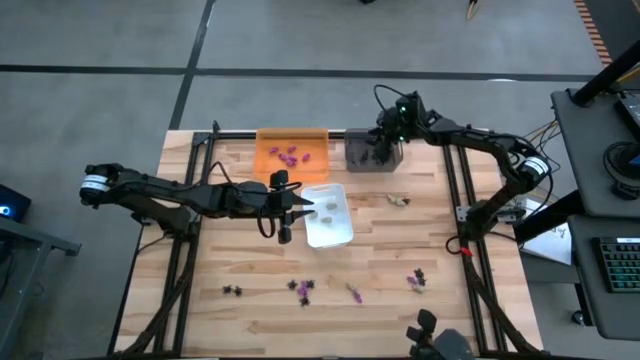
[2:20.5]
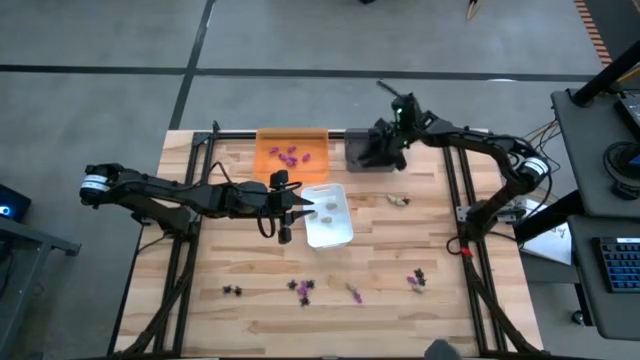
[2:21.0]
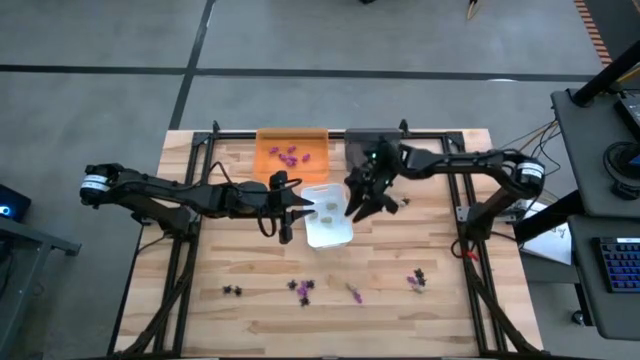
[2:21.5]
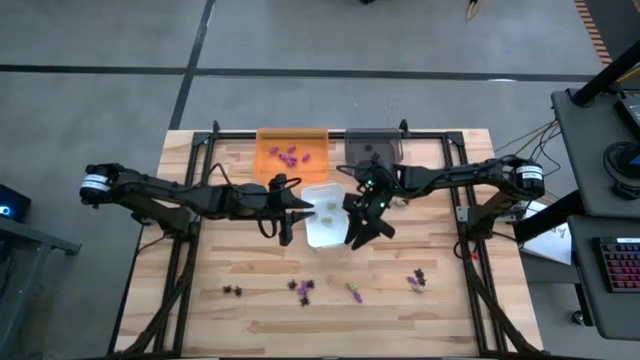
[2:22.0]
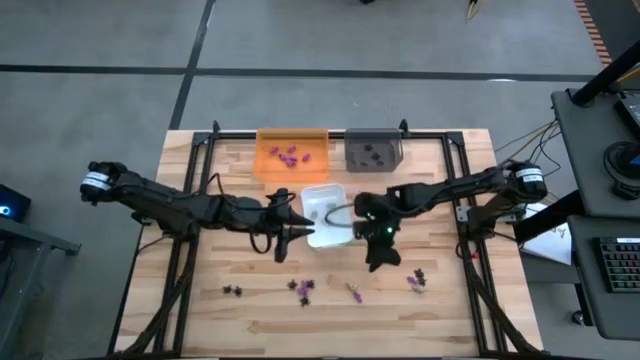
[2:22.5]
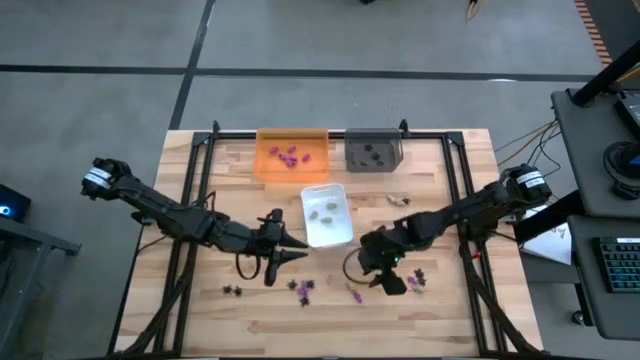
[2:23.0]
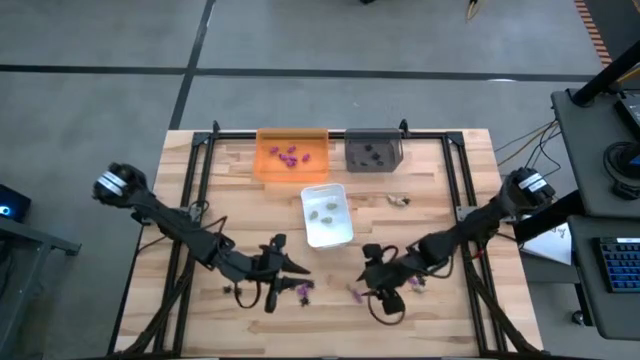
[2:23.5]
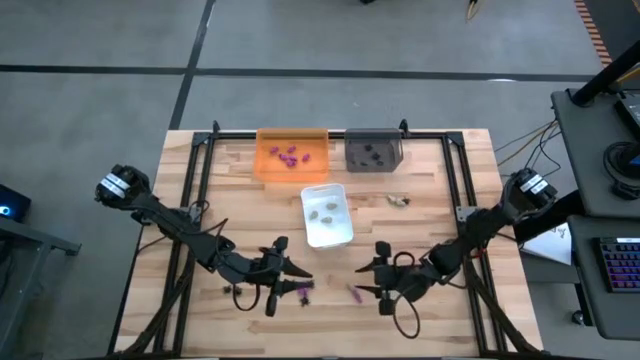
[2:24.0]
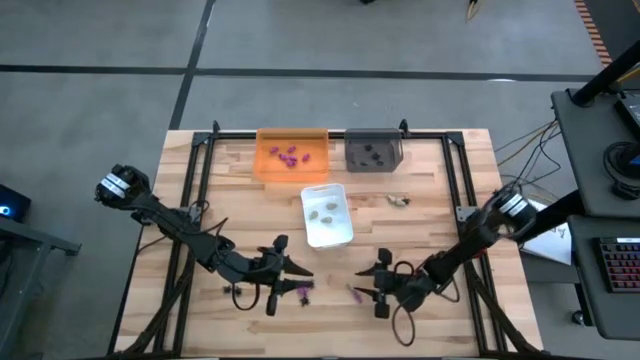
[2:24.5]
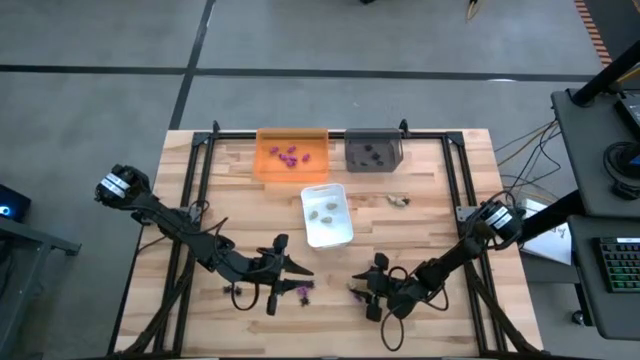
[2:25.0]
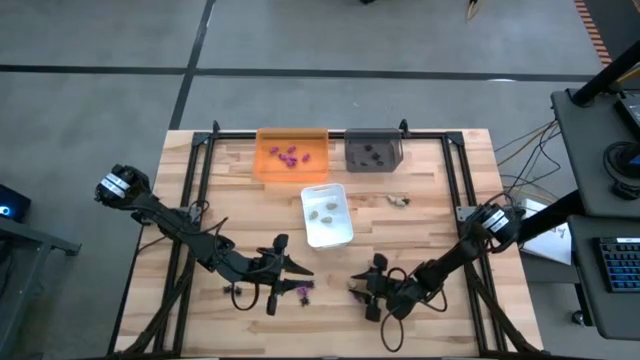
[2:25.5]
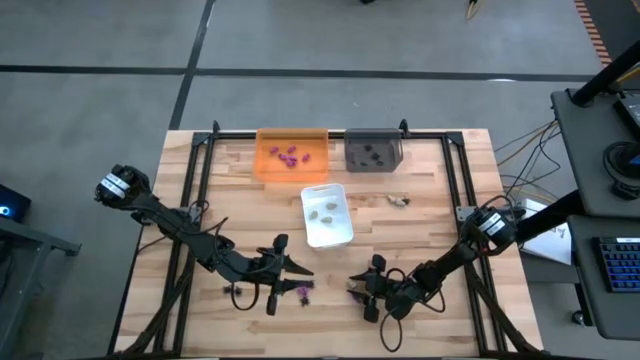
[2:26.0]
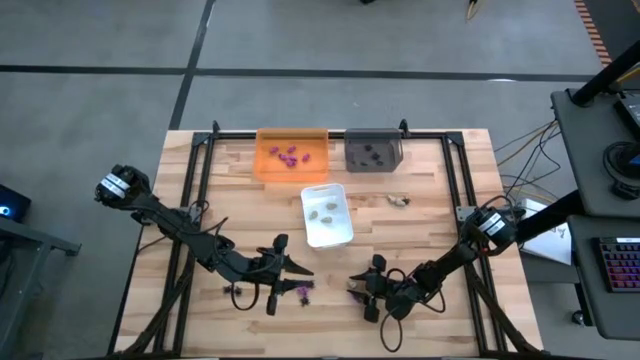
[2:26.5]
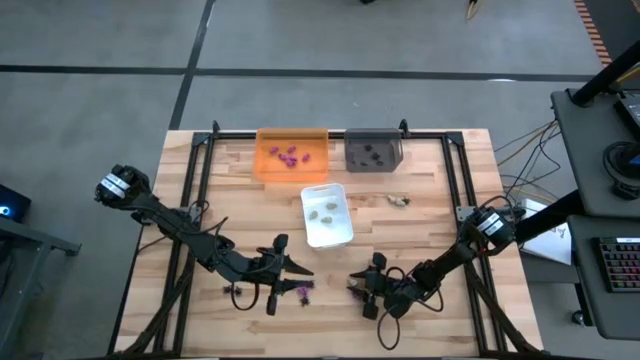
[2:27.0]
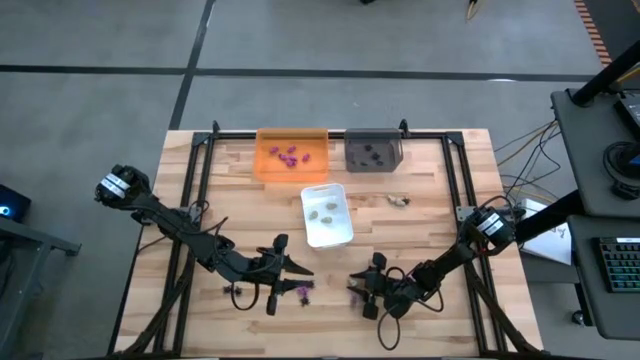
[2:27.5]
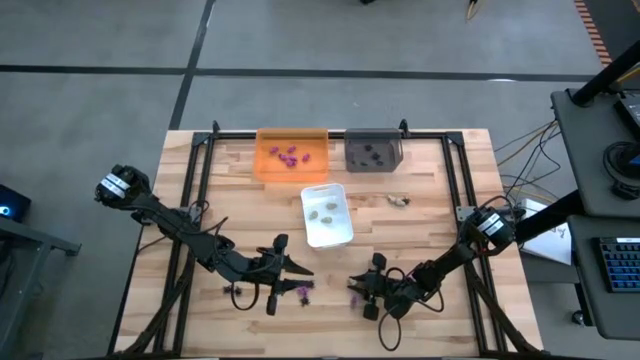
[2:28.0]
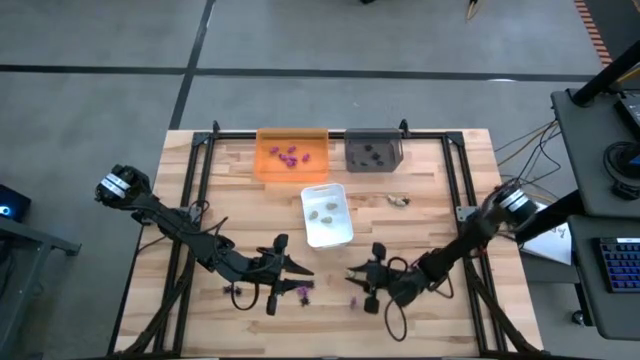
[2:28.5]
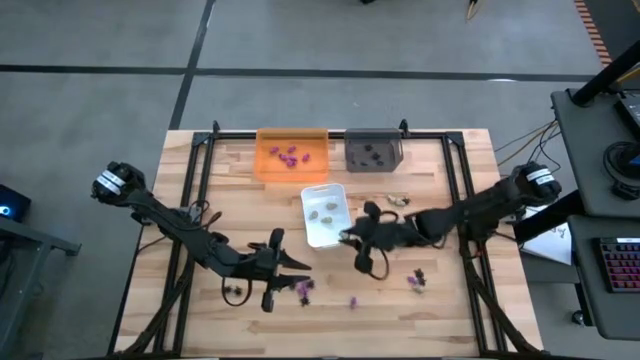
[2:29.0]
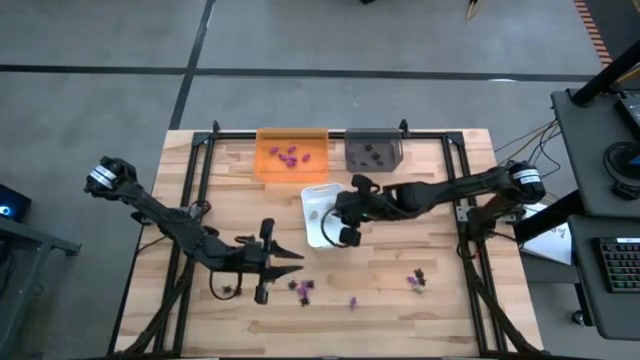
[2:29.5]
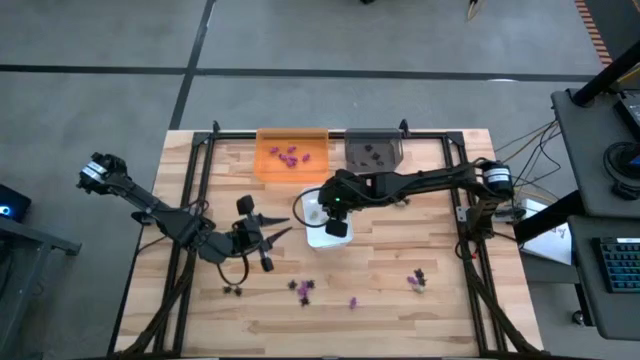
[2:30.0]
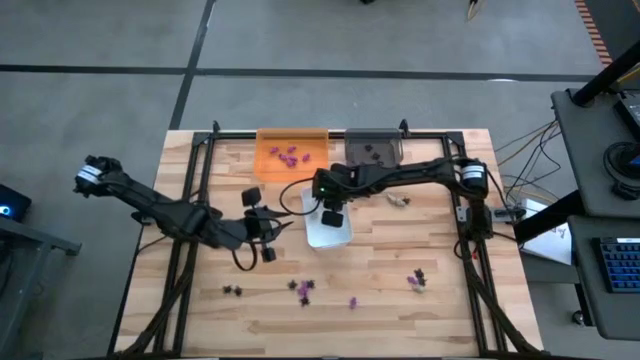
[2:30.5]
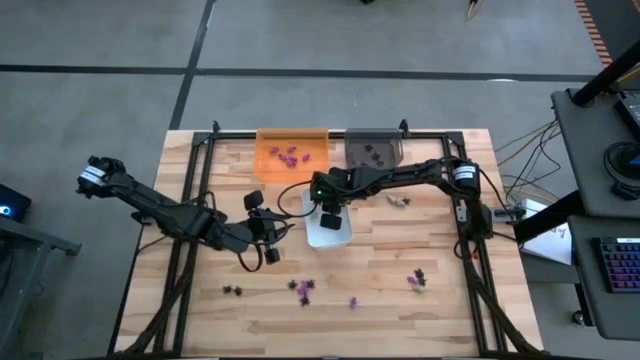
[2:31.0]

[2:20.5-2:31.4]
Task: Sort Halloween decoration
Put the white skull toy into the white bin

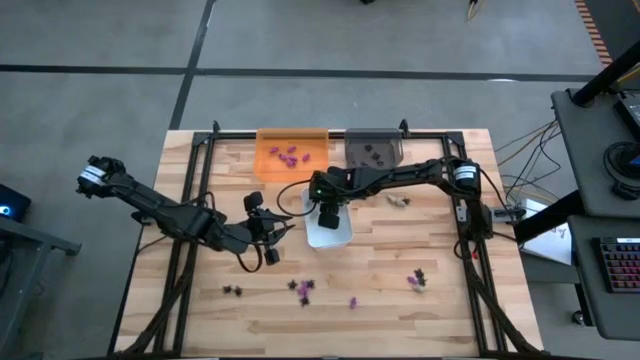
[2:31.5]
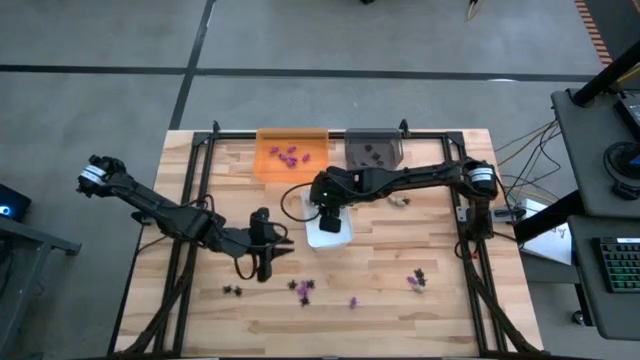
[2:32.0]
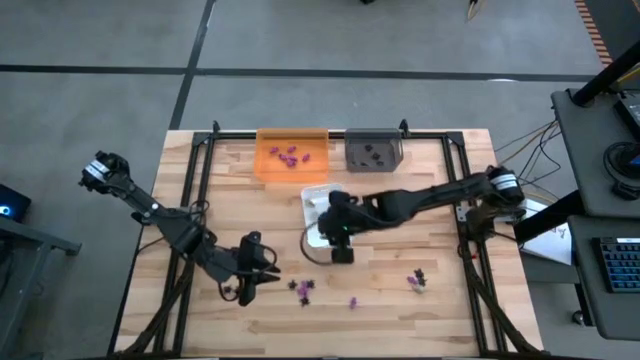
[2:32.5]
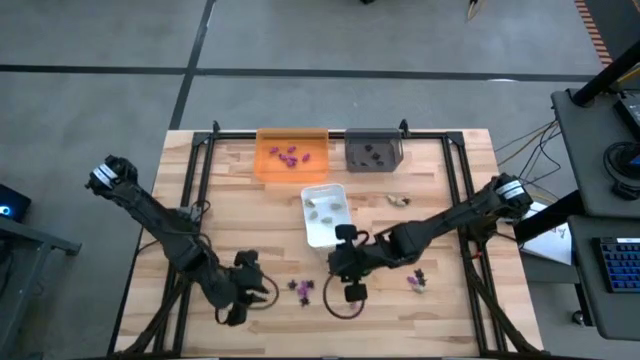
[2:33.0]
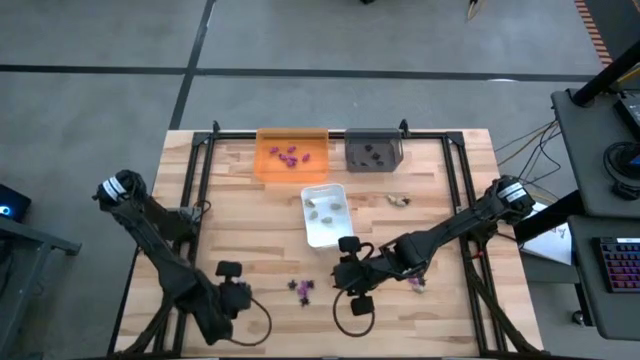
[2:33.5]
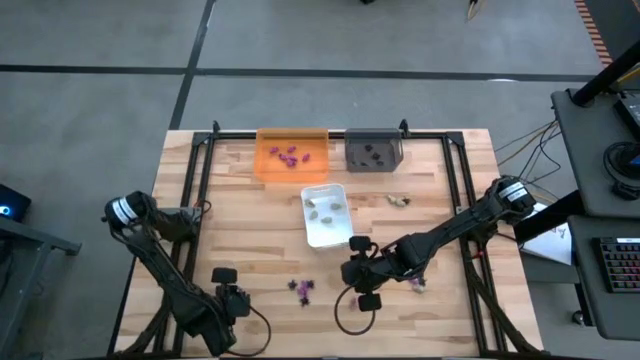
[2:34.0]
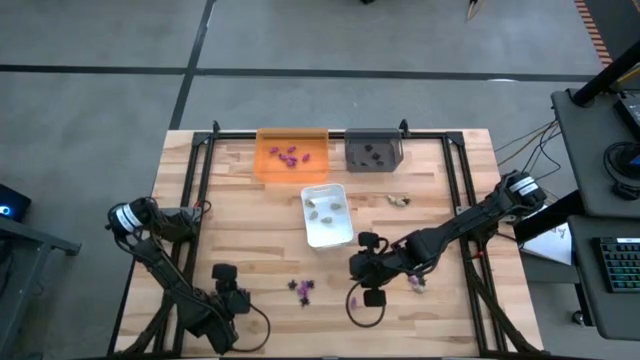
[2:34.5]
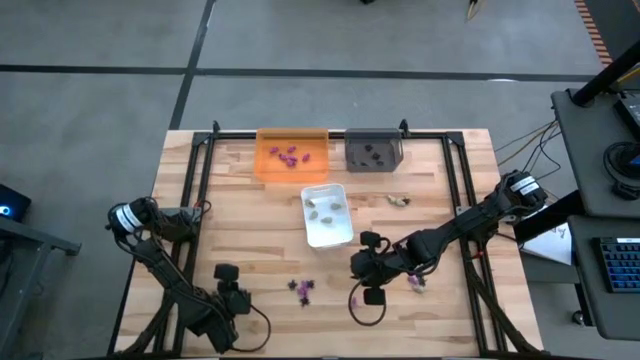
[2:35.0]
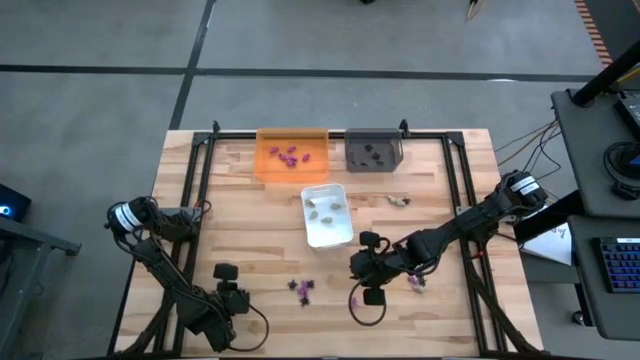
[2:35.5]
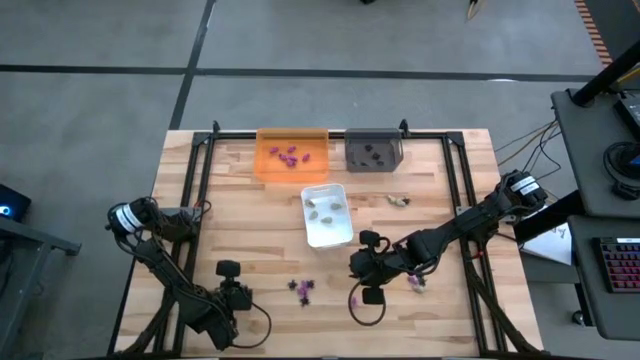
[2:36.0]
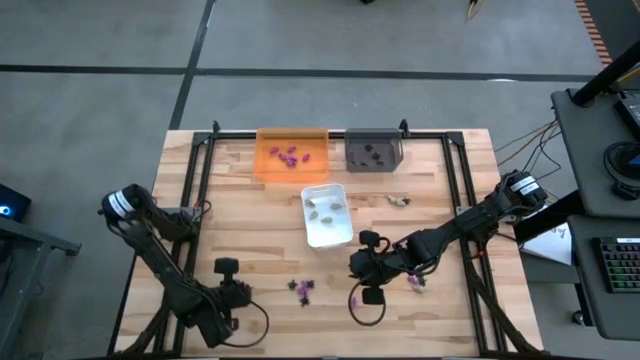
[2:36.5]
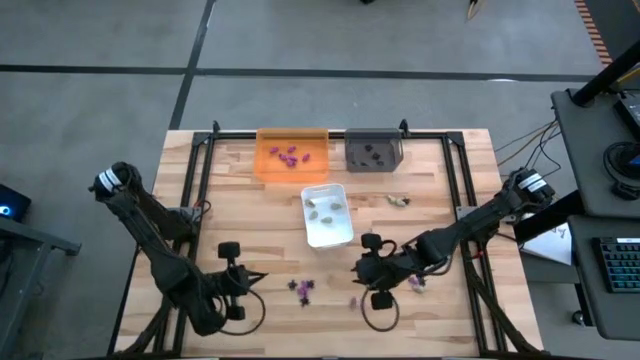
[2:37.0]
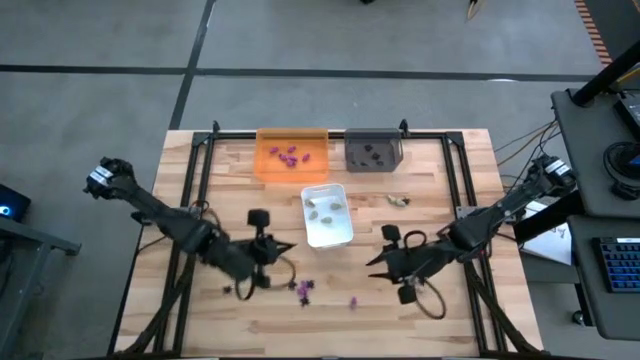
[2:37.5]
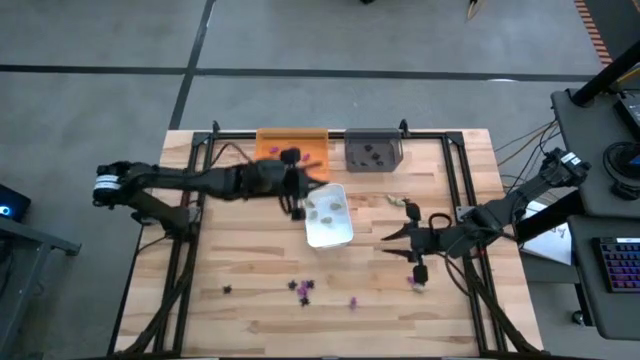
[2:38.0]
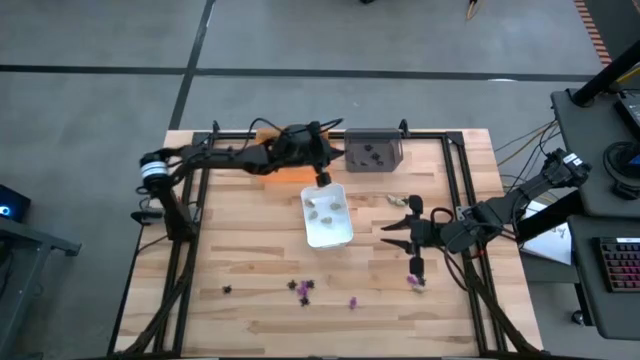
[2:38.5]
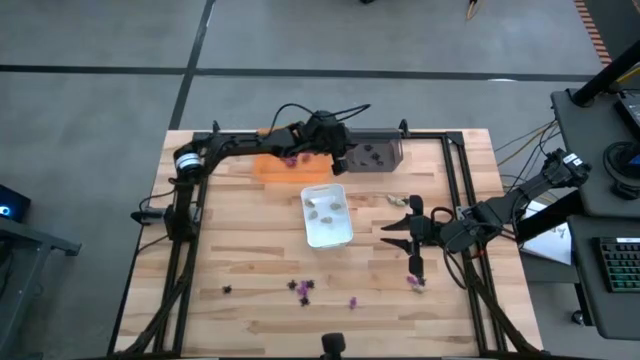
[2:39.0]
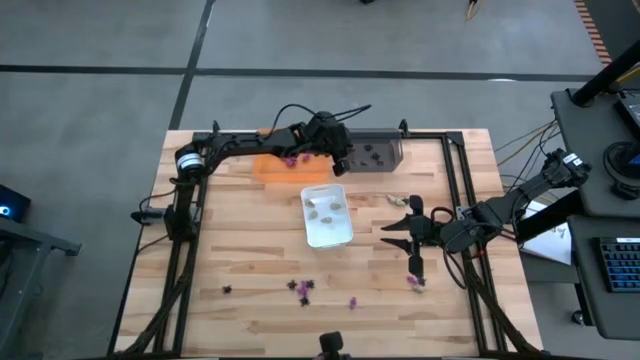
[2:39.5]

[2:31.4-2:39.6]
Put the black spider toy into the black bin

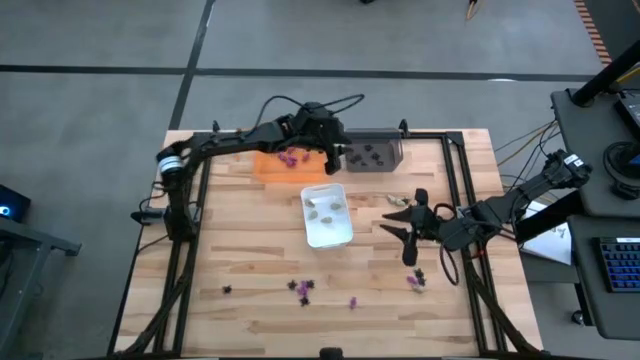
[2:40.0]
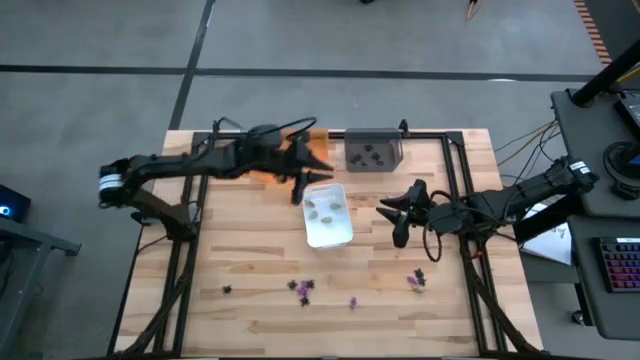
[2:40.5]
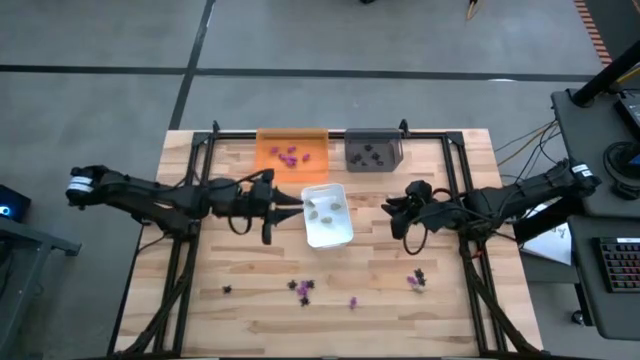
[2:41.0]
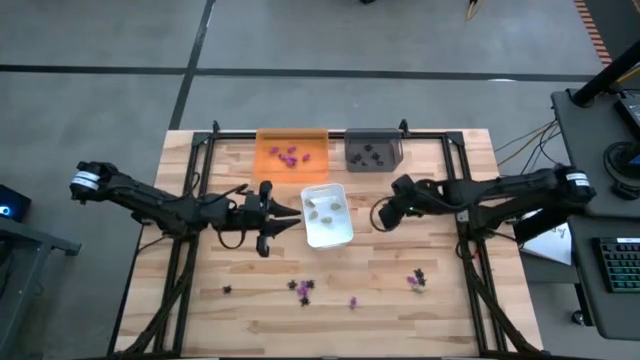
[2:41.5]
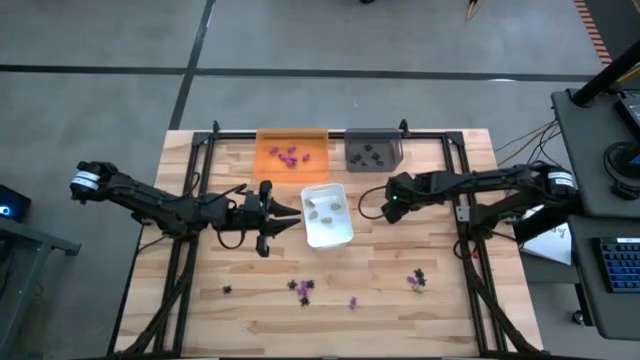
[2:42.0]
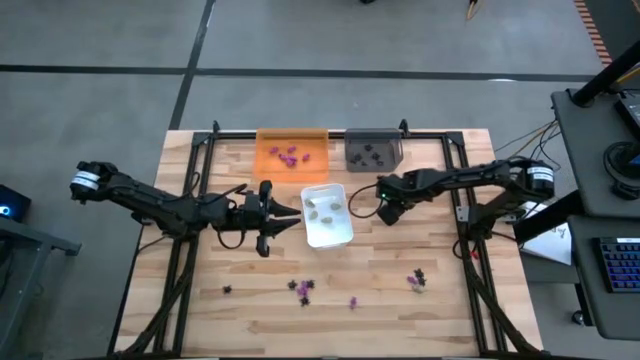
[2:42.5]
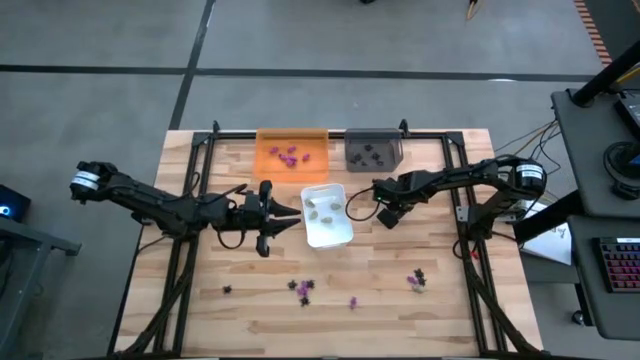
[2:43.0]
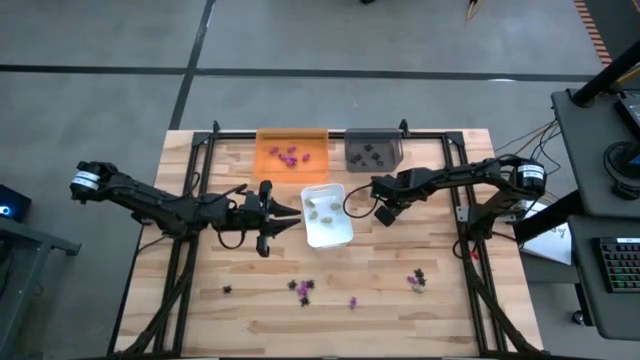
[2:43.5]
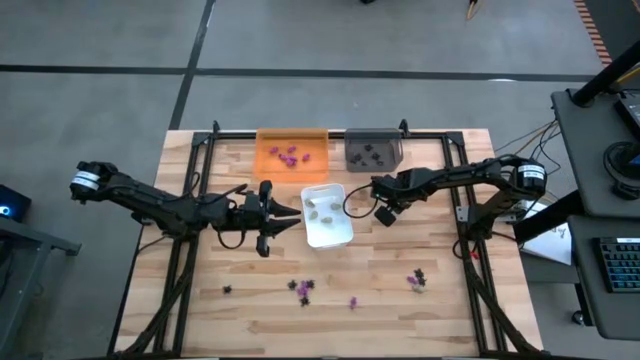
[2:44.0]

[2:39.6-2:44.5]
Put the white skull toy into the white bin
